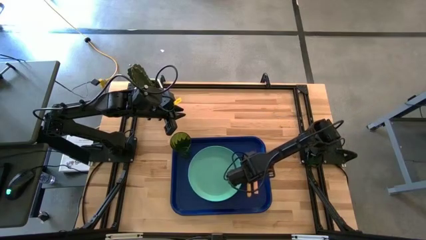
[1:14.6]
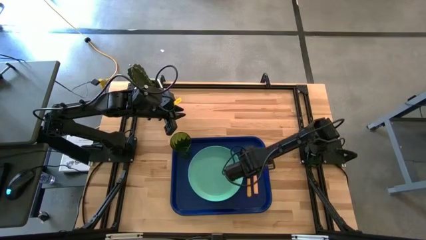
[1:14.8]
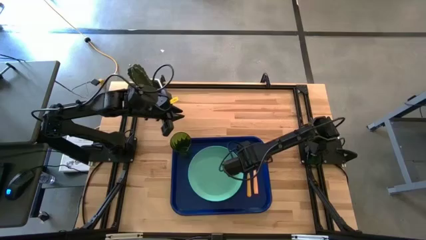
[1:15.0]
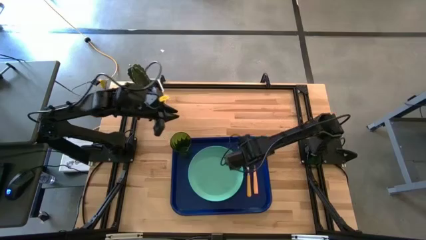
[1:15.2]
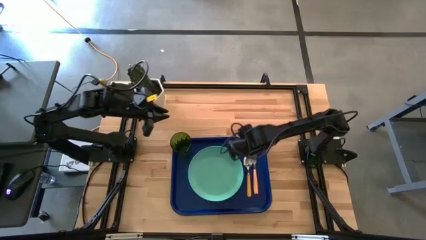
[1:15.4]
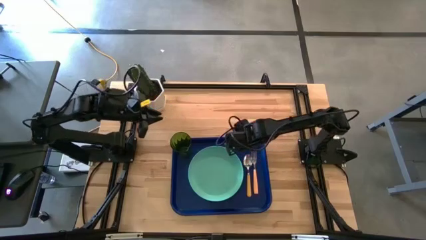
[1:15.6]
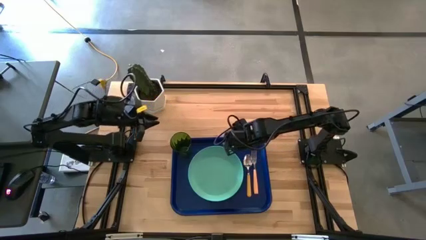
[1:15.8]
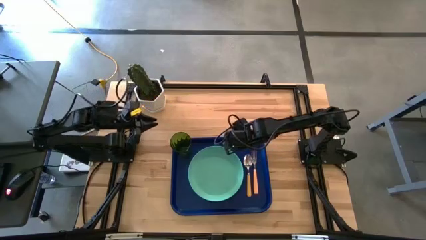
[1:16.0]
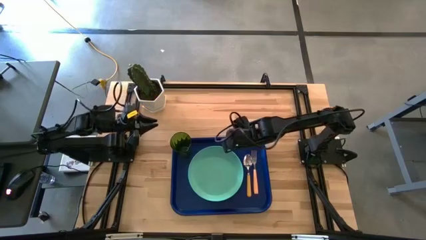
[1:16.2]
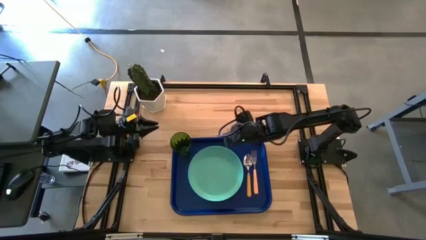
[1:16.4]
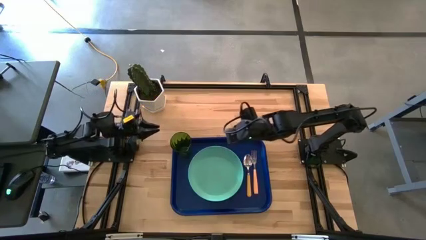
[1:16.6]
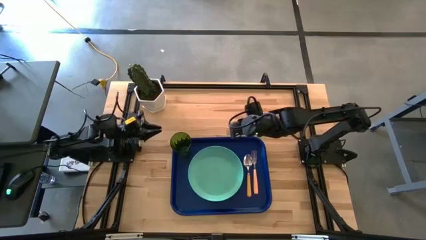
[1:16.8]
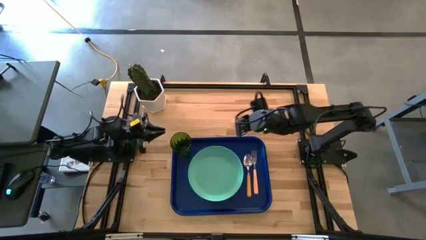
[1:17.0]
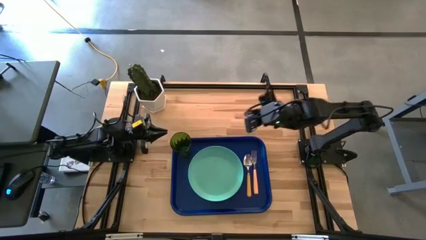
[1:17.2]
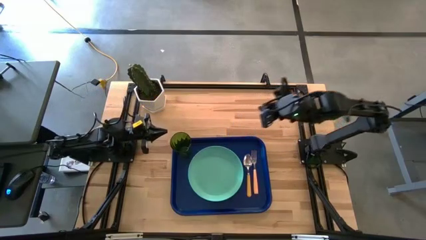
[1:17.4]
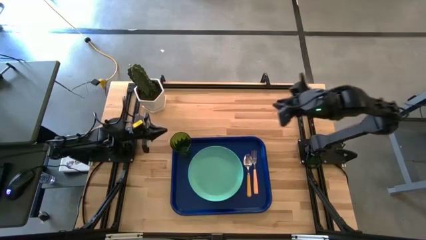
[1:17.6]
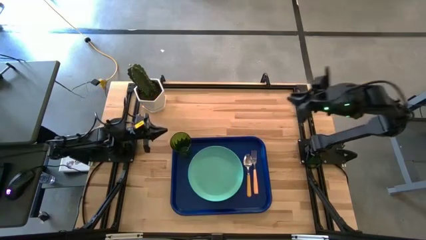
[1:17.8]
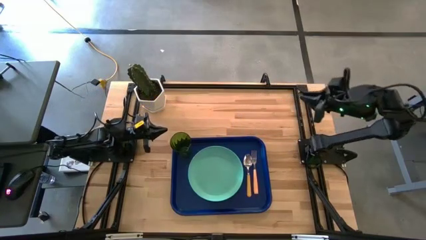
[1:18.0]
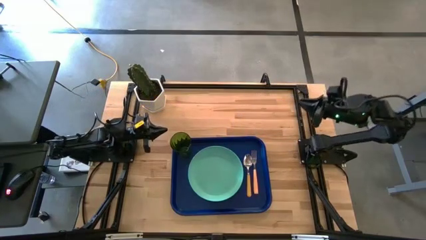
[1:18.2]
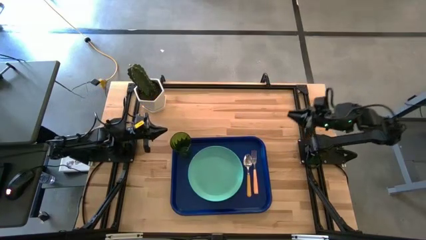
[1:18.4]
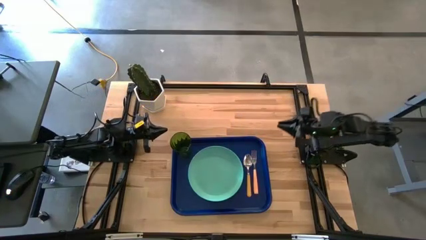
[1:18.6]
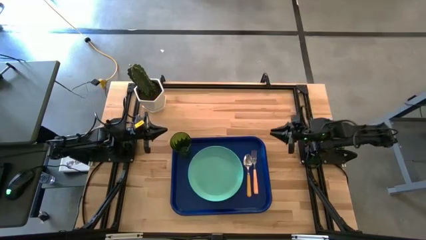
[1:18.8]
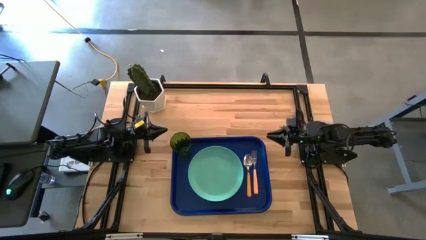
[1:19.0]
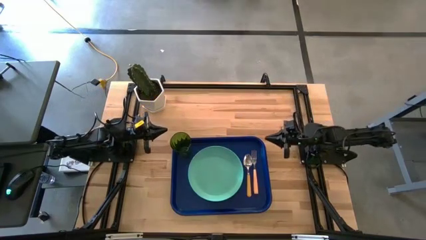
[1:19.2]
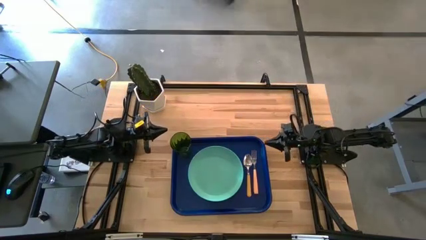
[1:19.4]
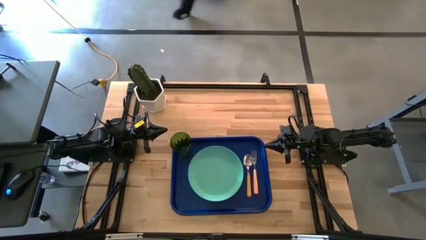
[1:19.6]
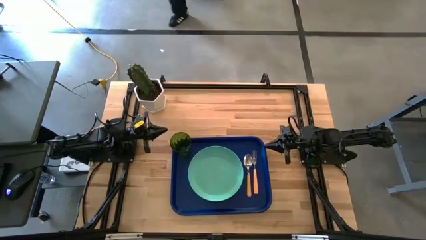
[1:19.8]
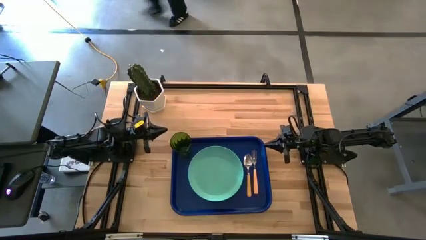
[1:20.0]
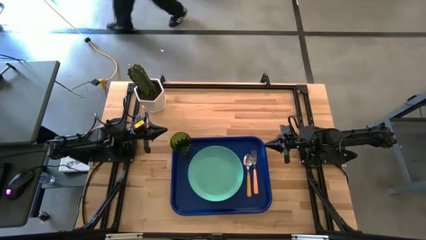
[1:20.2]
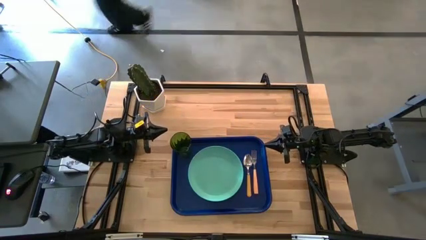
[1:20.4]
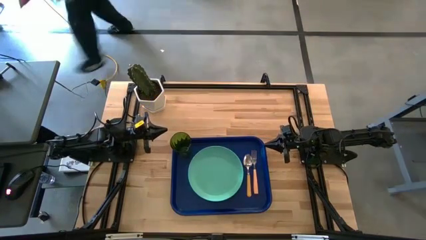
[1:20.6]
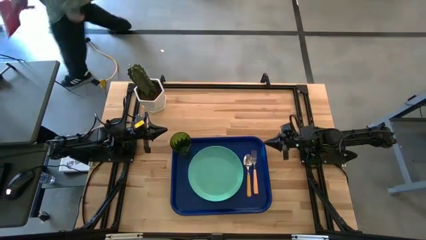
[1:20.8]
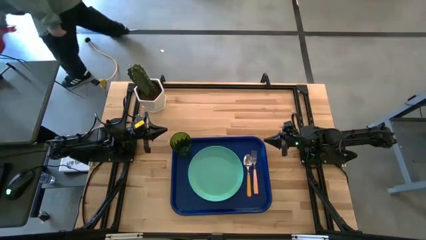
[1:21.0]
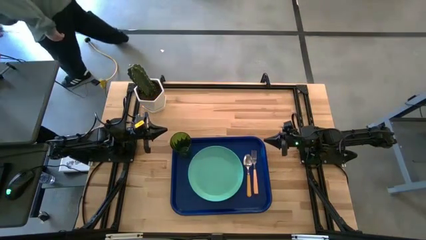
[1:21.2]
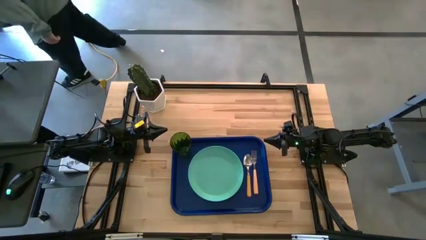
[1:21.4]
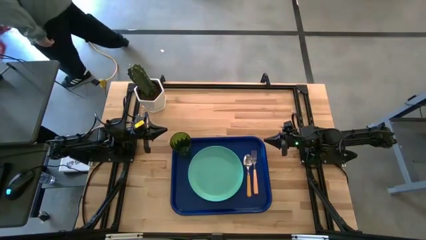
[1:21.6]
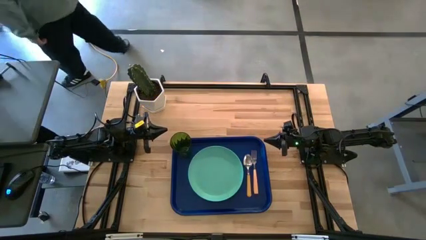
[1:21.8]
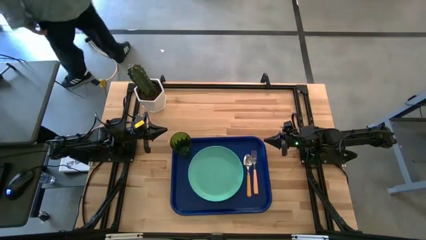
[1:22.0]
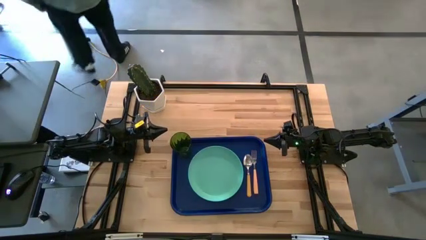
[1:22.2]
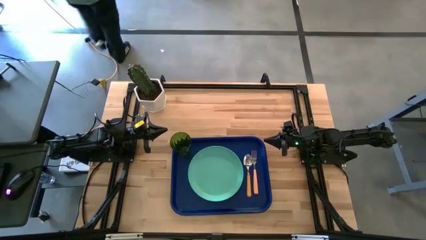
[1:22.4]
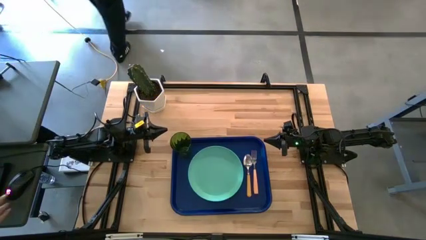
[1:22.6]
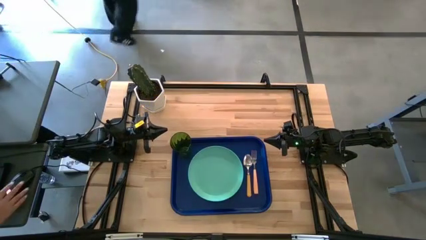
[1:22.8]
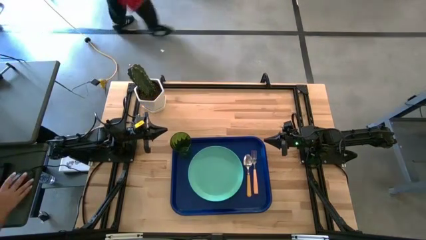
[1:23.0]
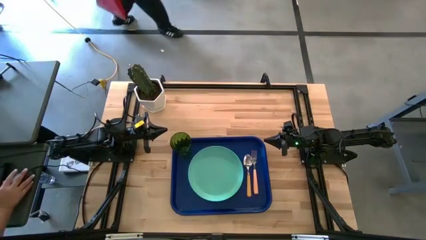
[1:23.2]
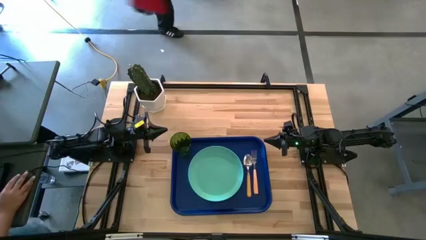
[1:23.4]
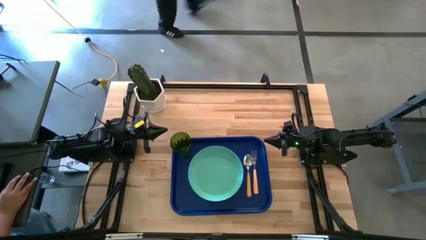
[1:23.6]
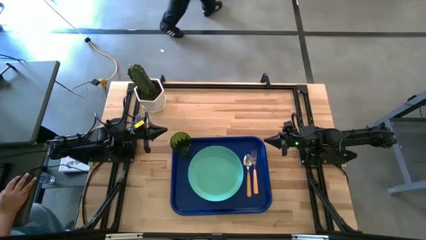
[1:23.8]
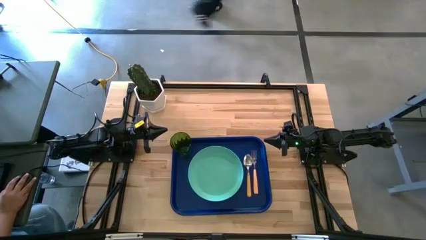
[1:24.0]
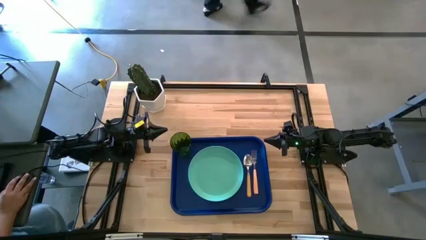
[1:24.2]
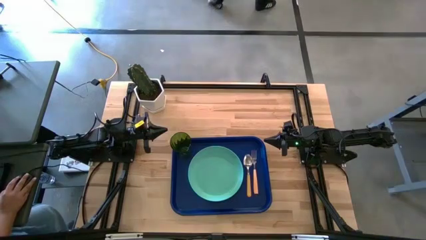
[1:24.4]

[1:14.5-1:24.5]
Task: Pick and place plate/cup/fork/spoon on tray
Return to Home Position
